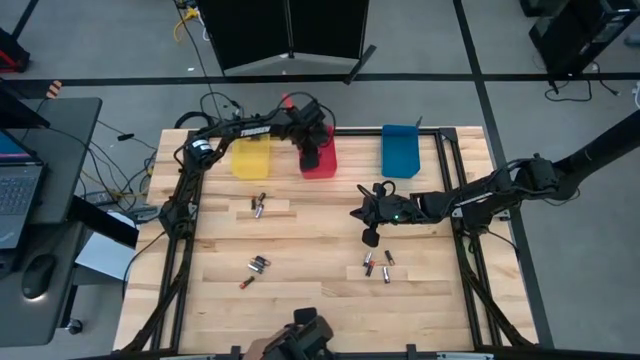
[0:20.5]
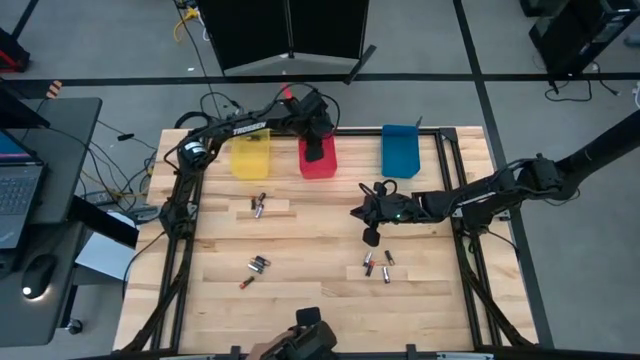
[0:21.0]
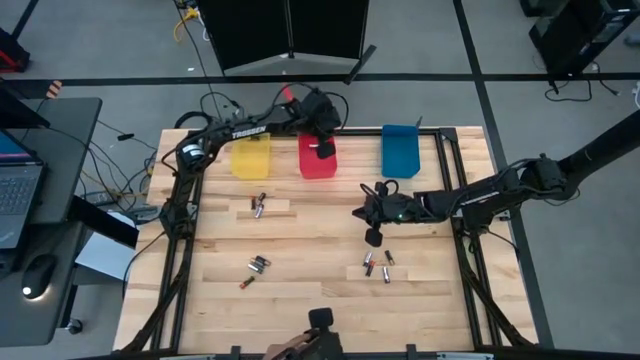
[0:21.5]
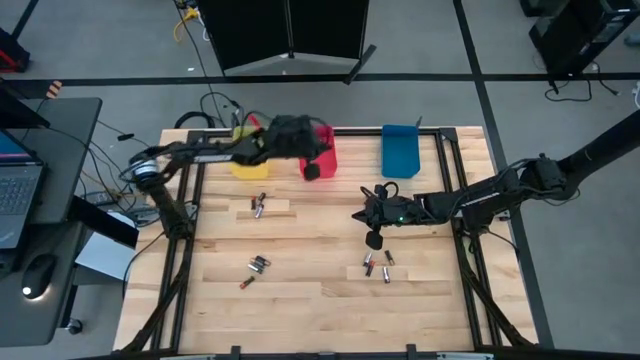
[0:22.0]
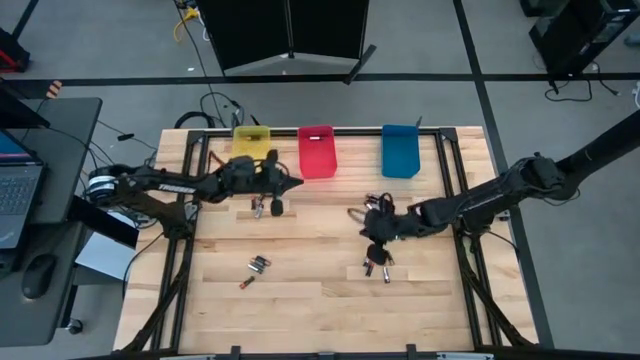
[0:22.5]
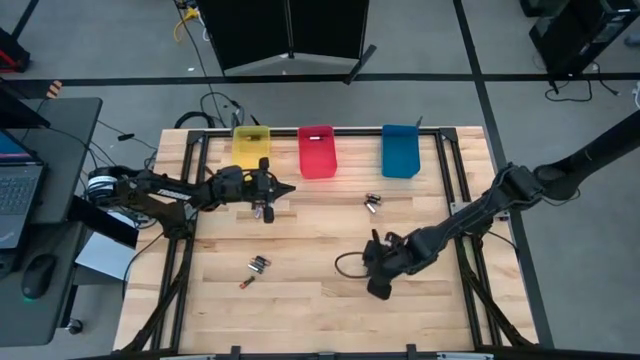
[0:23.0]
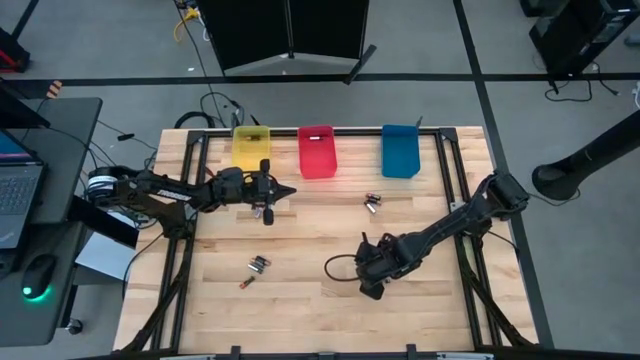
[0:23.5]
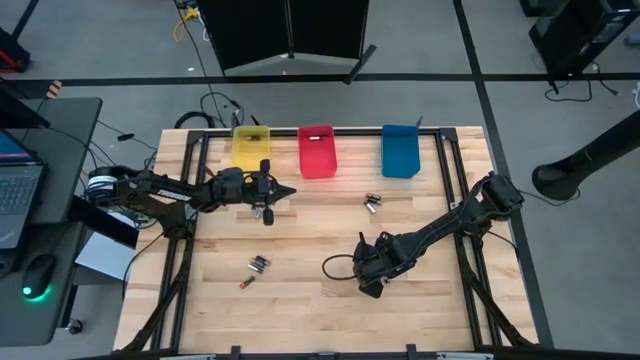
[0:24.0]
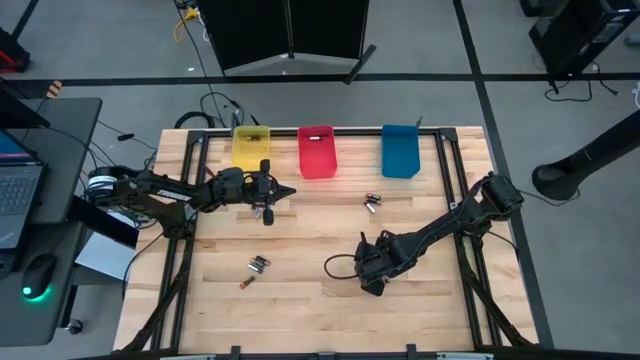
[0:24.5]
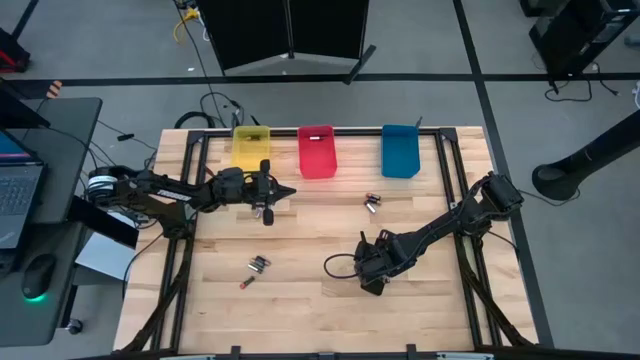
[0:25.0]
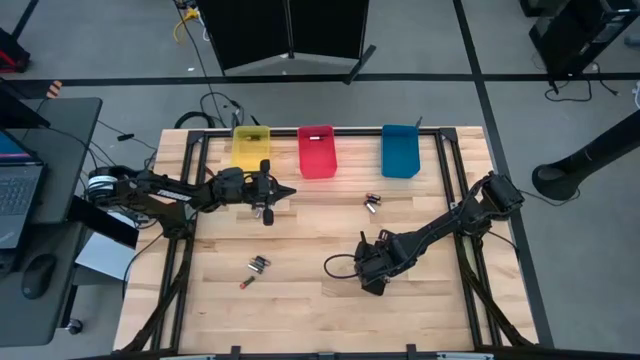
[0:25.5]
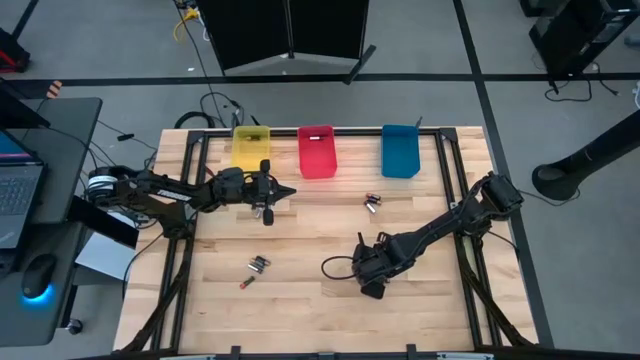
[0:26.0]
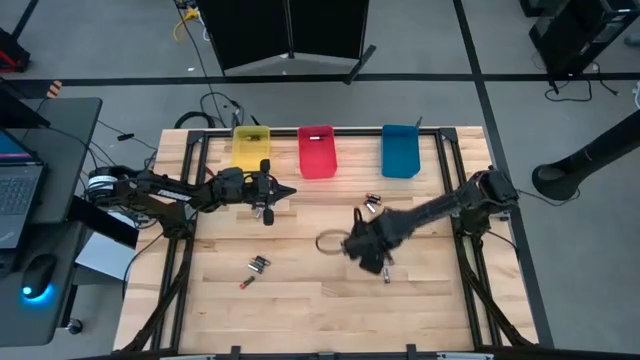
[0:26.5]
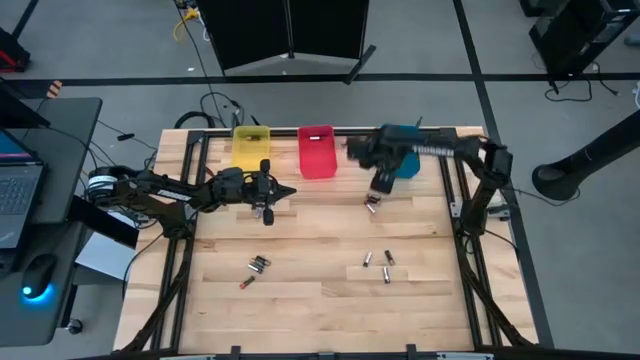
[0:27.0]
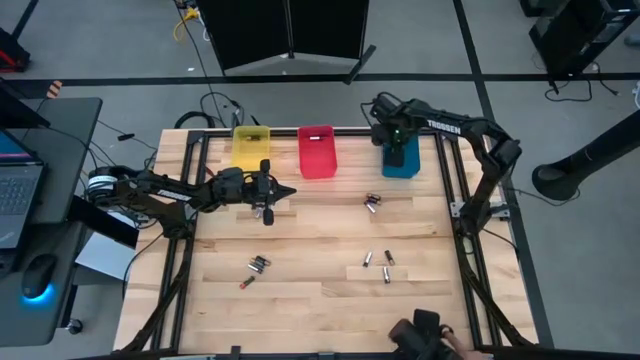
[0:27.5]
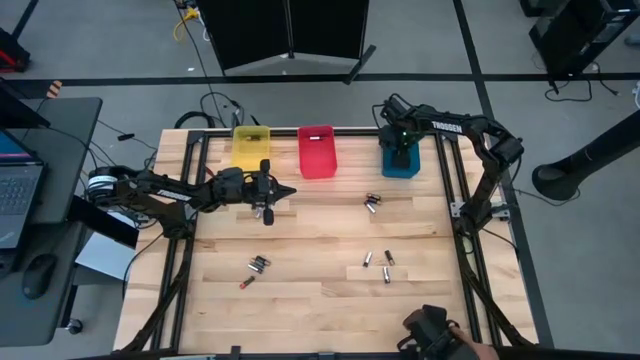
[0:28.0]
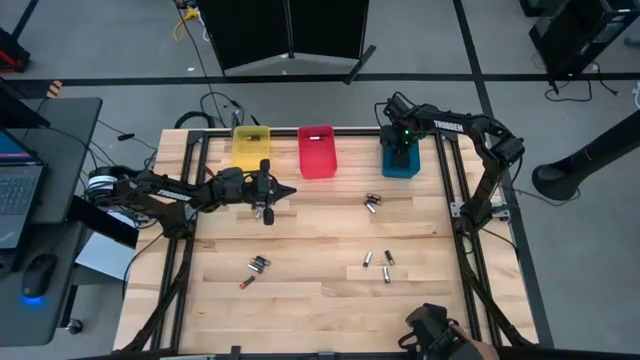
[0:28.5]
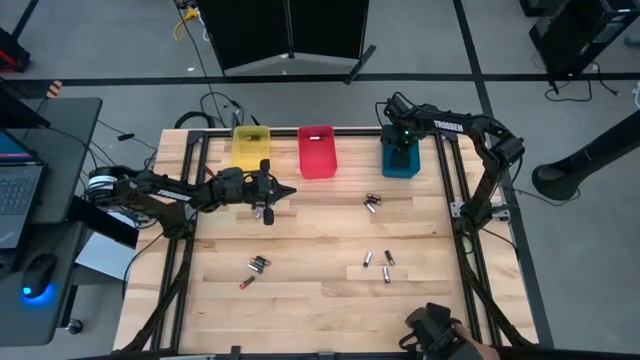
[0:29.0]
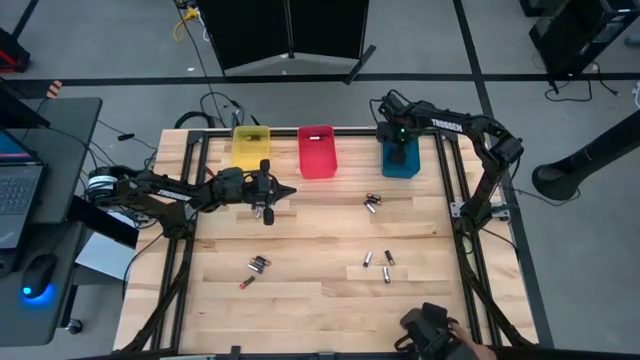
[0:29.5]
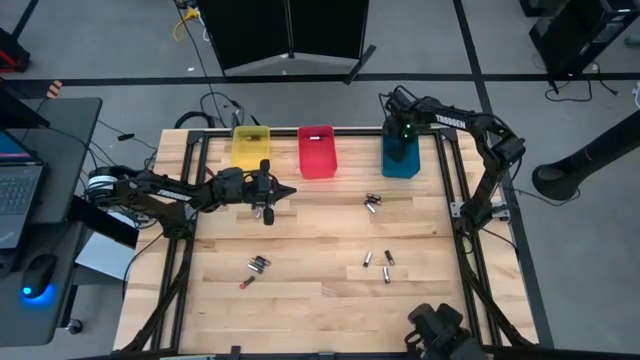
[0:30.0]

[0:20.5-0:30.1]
Task: Sort batteries
Put the orange battery into the blue bin

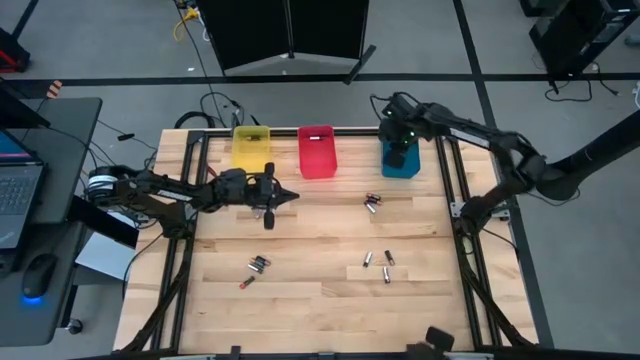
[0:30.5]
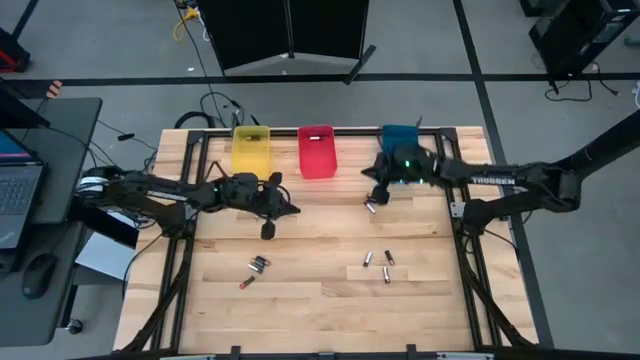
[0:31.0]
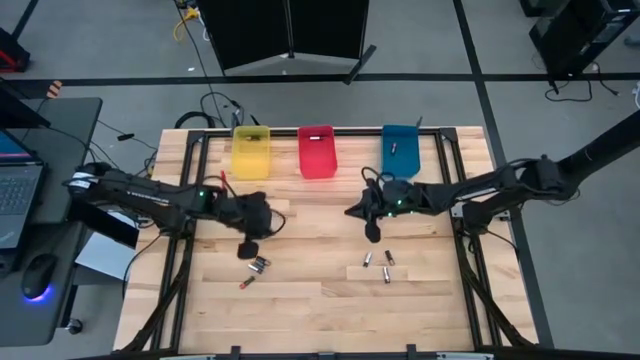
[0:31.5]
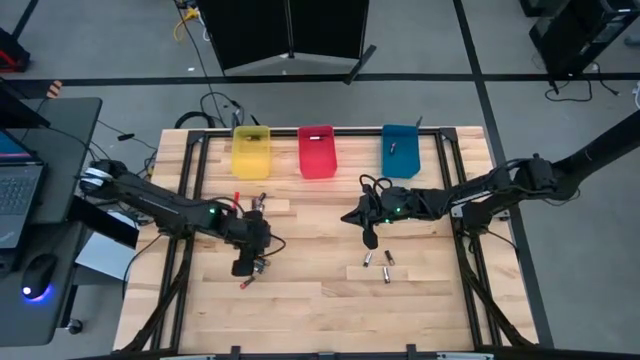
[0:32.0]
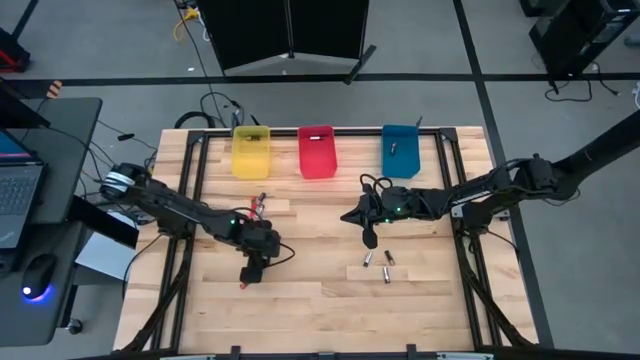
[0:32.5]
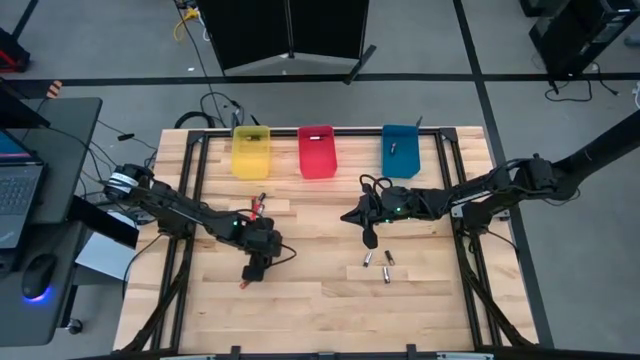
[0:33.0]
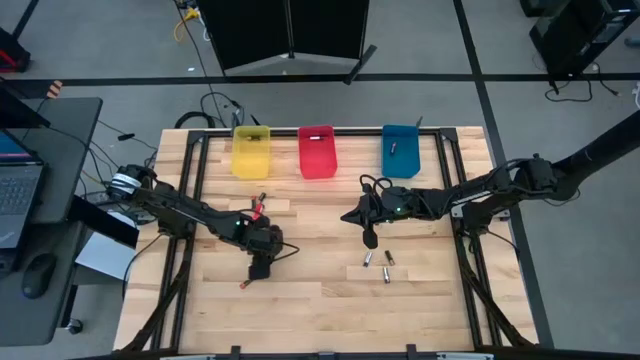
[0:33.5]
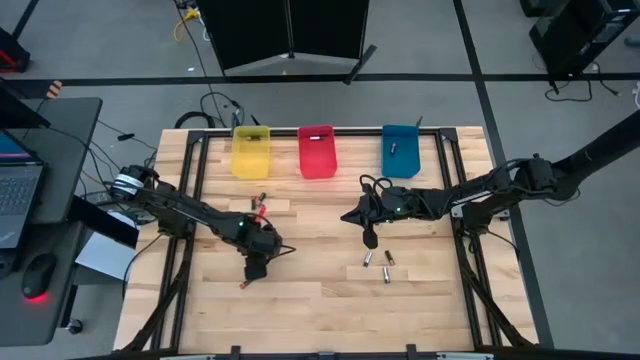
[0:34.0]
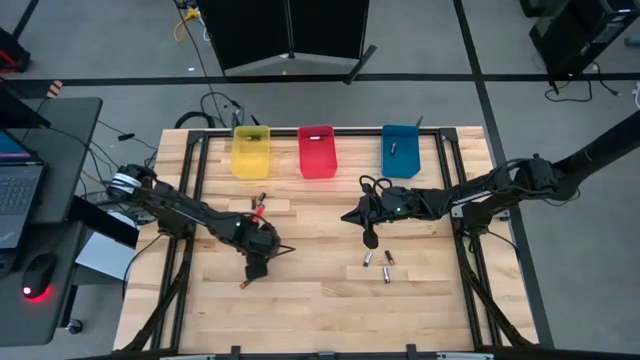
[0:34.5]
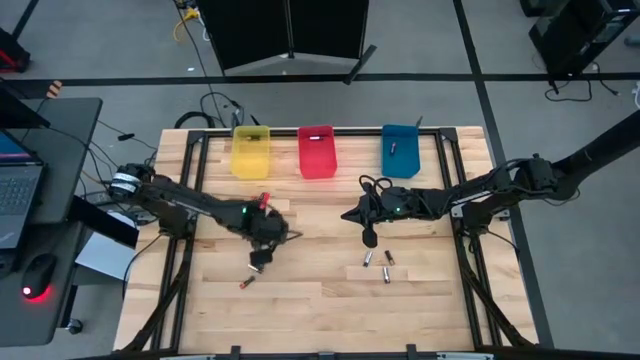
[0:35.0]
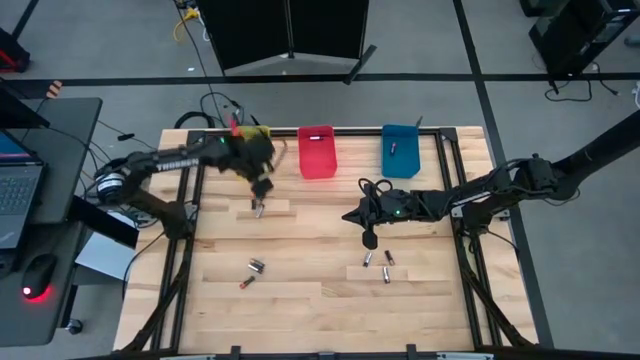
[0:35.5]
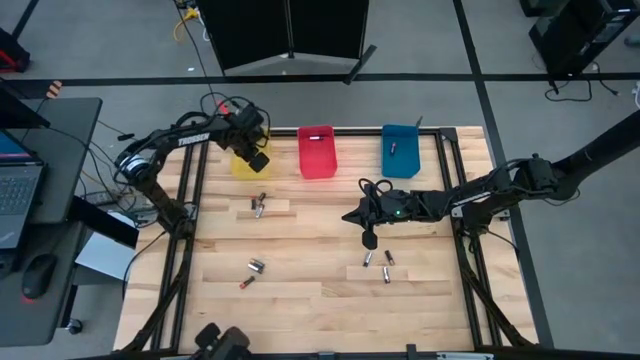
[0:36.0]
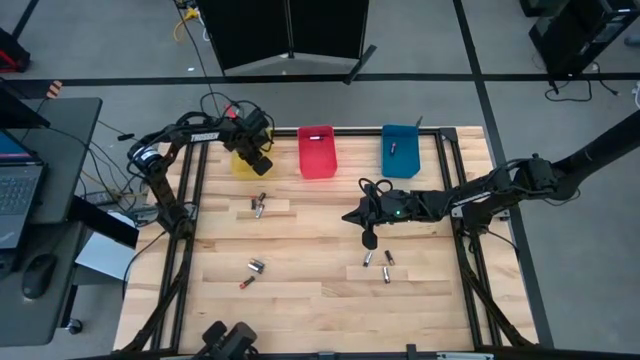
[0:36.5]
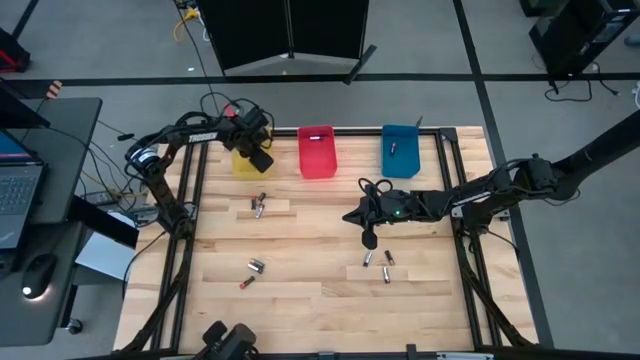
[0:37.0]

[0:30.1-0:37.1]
Put the brown battery into the yellow bin

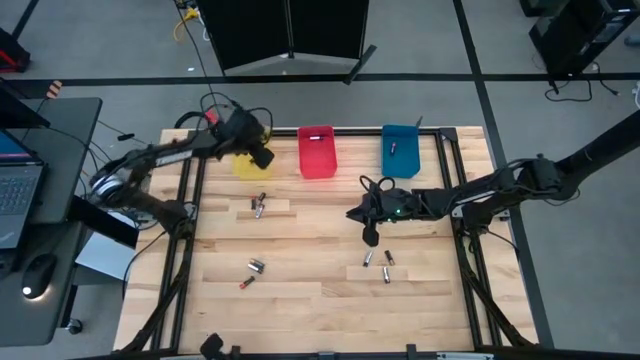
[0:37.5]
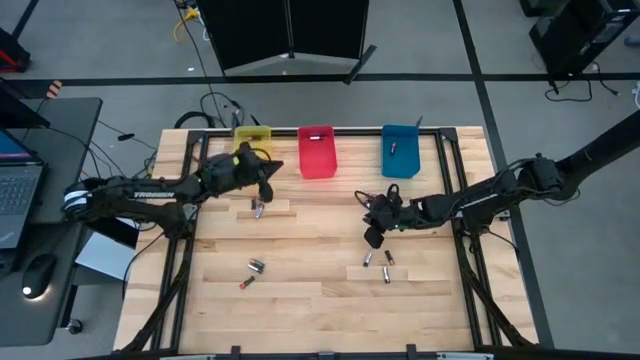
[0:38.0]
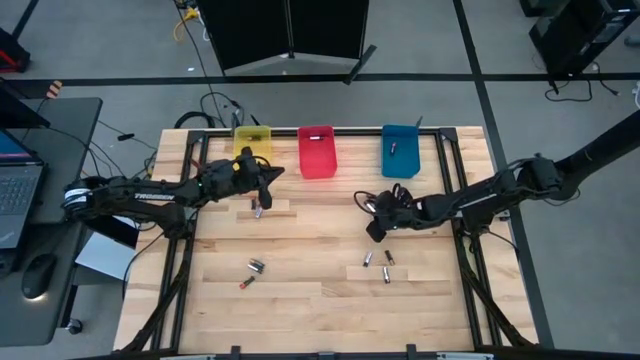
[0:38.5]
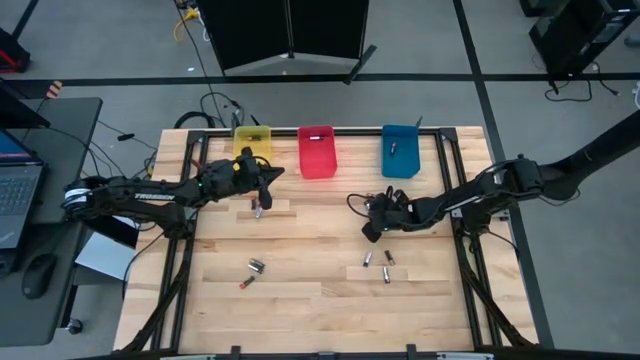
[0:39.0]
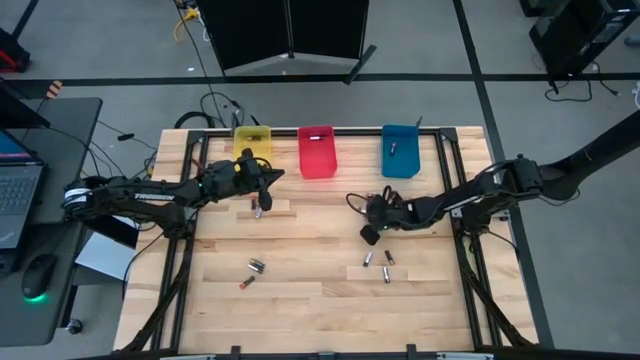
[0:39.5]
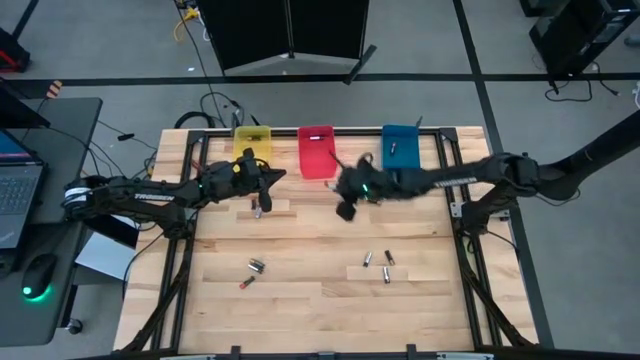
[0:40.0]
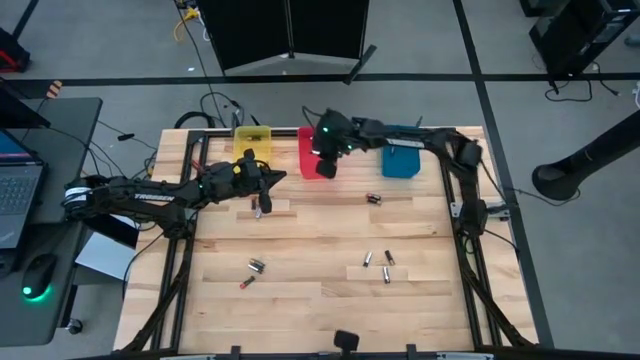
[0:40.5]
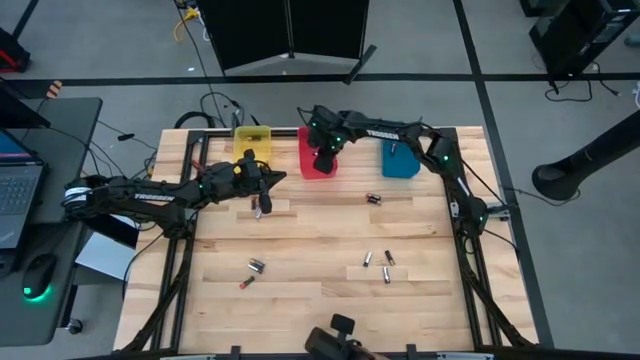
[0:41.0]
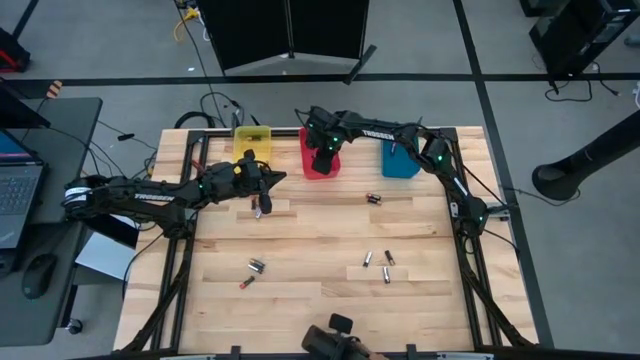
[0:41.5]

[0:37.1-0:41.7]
Put the silver battery into the red bin

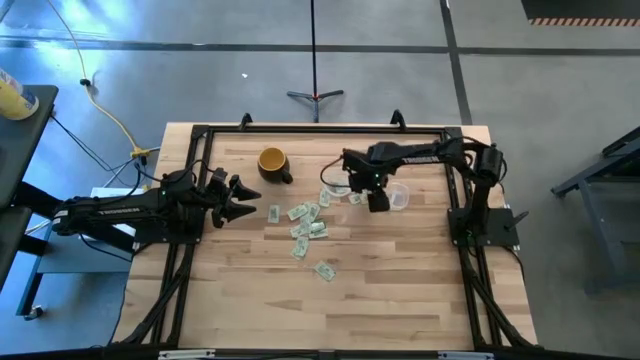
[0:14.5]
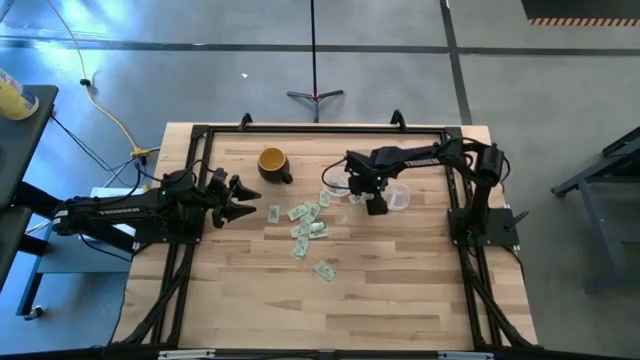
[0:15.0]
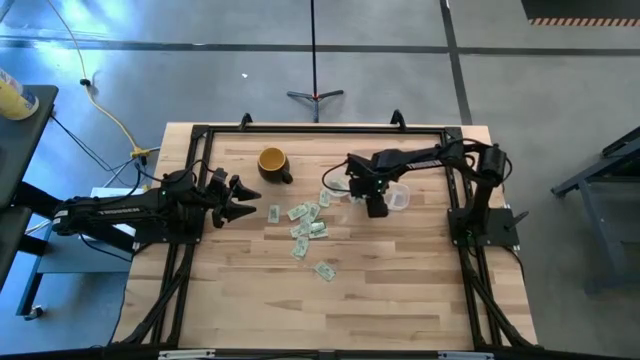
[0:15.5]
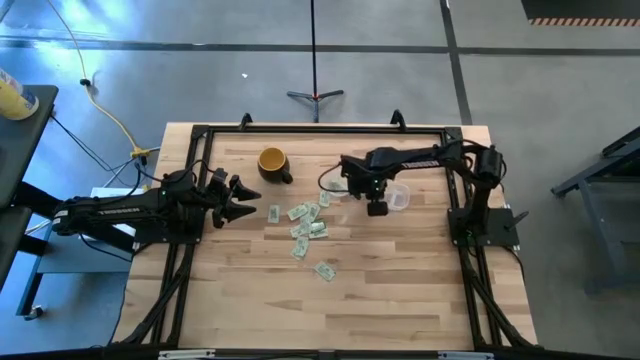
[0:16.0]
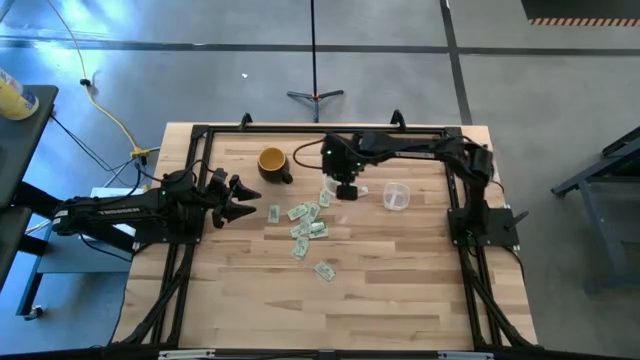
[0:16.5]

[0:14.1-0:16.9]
Task: Pick and place items into bin
Put the light green stevia packet into the left transparent bin
